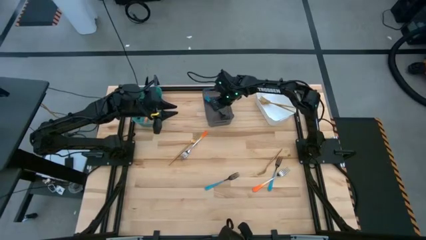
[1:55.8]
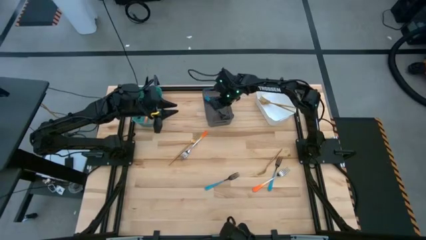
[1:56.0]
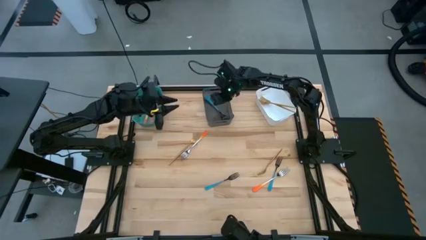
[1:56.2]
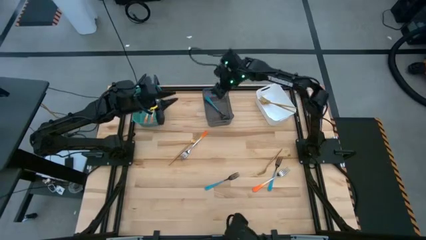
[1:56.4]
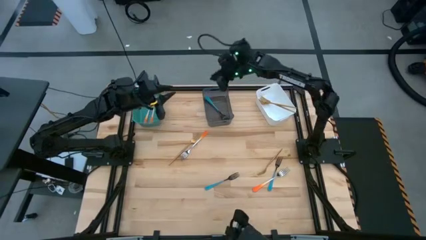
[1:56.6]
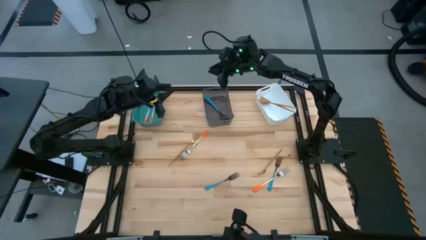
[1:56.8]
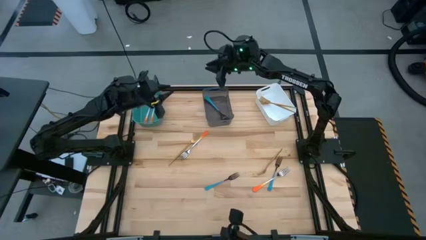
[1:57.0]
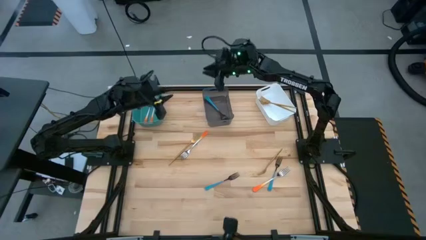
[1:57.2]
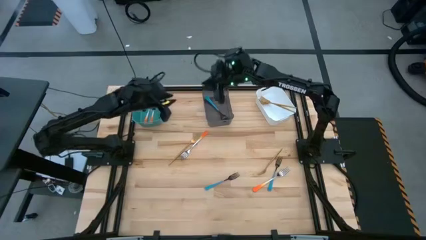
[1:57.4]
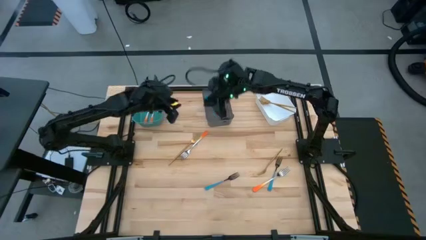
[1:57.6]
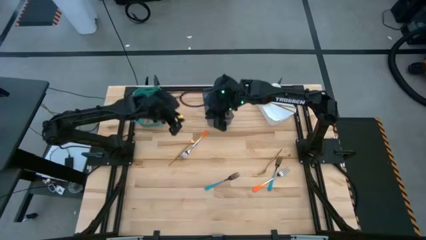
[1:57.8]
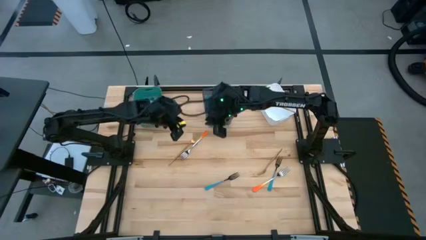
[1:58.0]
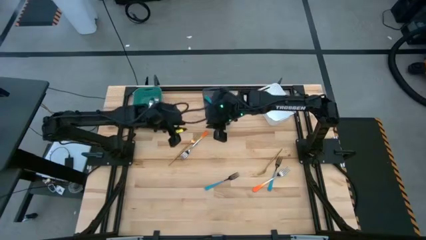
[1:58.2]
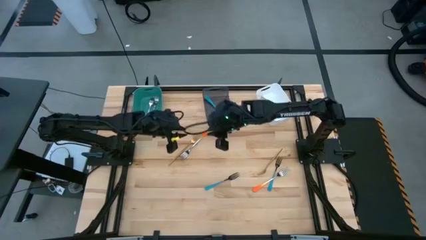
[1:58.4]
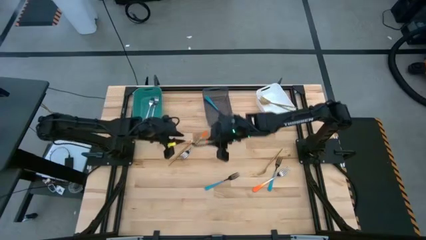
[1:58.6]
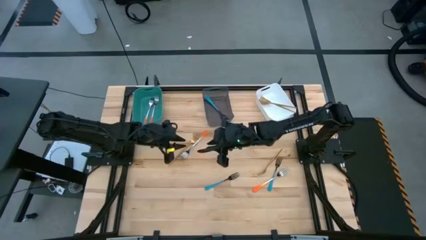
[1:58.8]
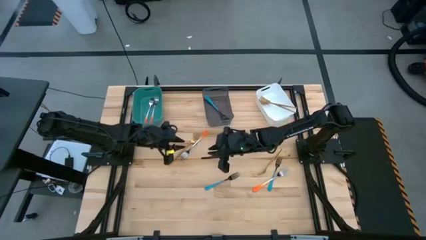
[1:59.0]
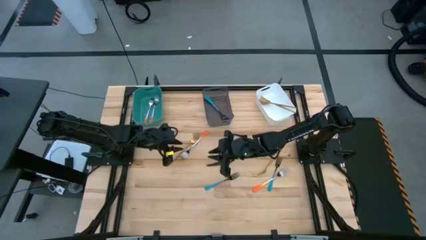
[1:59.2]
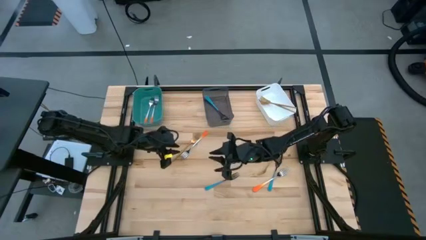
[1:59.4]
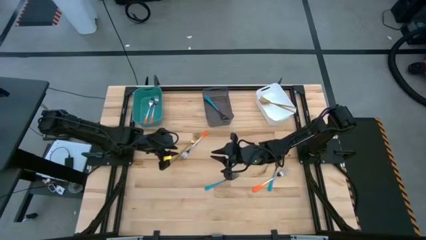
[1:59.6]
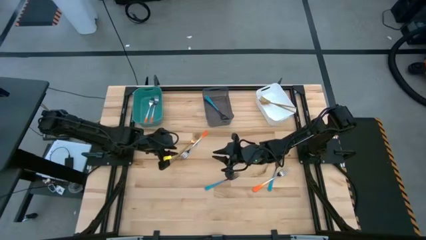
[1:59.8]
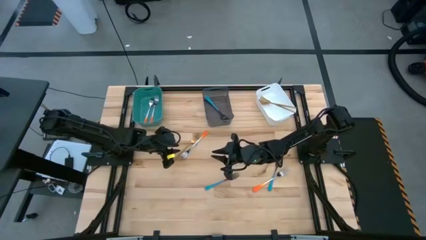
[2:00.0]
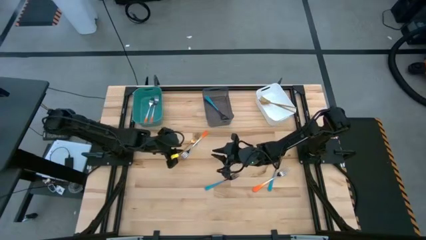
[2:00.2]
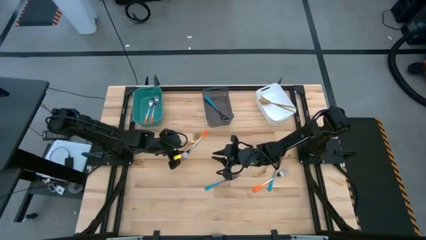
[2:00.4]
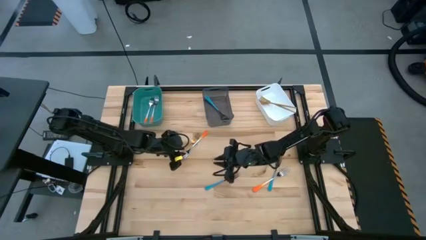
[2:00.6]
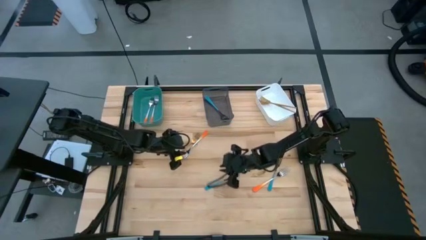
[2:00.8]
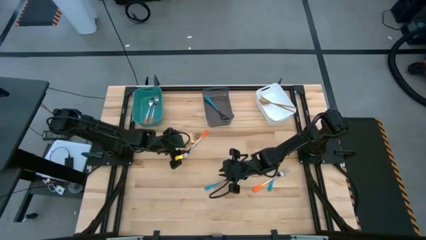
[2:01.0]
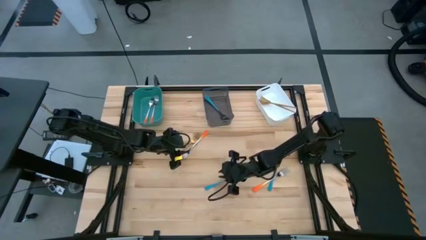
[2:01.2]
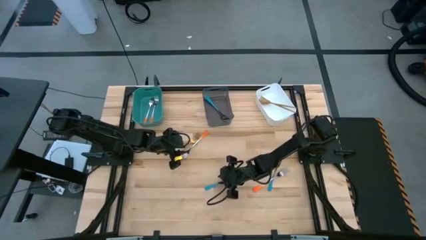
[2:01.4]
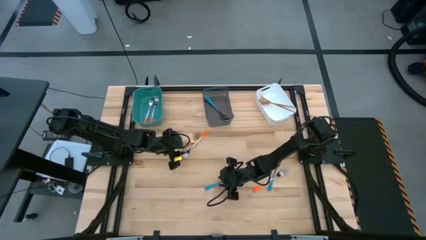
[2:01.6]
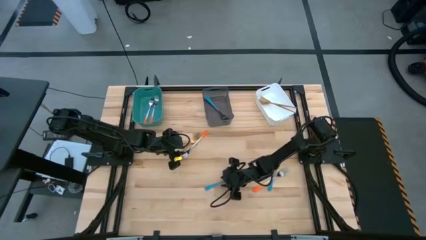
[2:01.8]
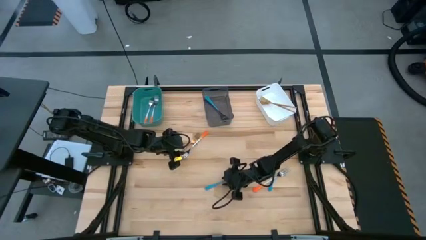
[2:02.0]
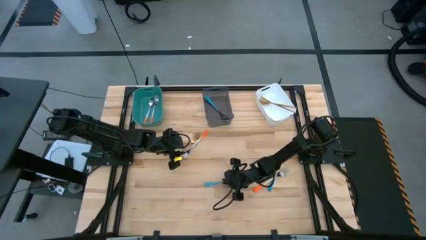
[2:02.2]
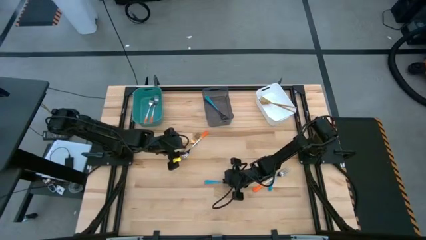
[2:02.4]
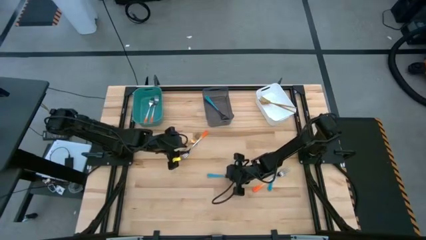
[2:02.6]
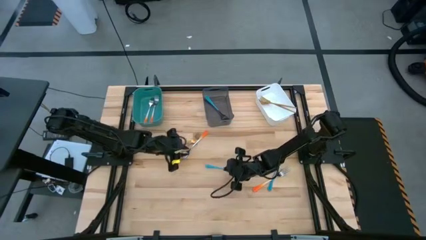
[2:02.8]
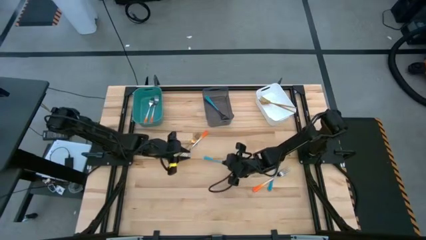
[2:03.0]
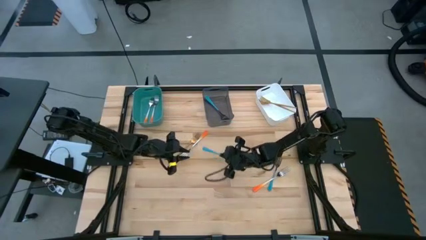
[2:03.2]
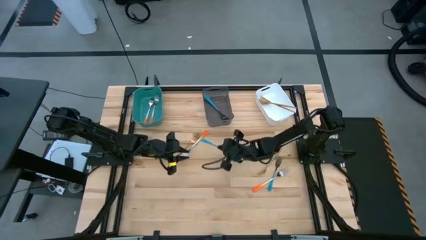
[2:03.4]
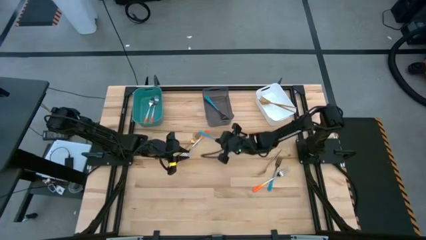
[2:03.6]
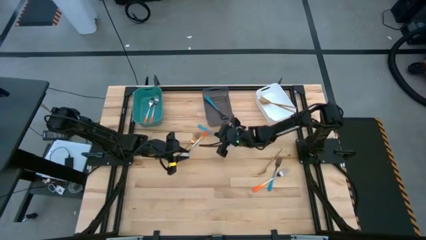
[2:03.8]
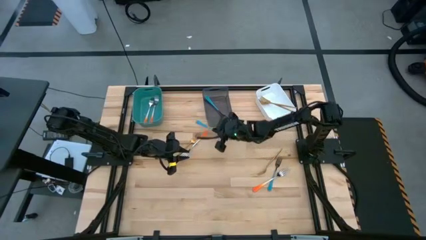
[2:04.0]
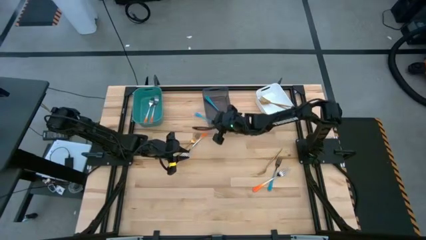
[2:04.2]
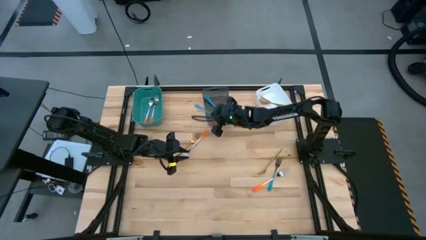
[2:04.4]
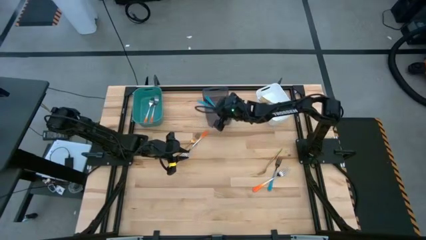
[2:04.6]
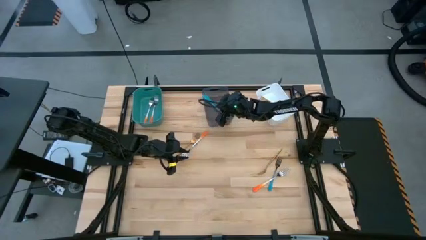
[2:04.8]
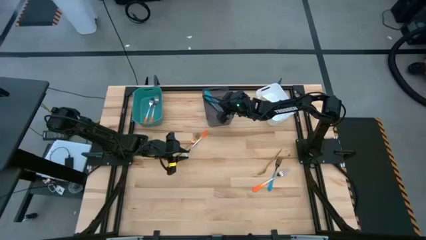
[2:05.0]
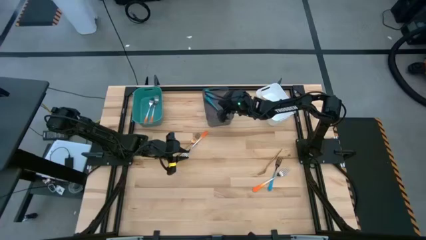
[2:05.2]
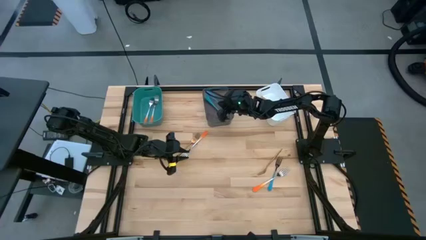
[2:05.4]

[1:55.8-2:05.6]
Task: Sort silverware by color (type)
Put the left blue fork into the black bin

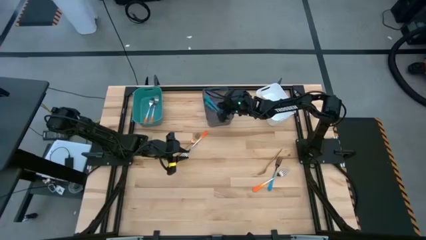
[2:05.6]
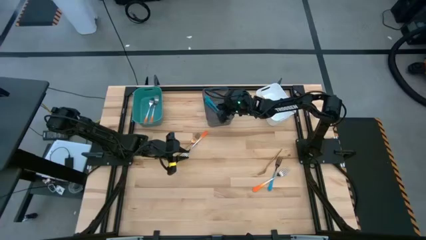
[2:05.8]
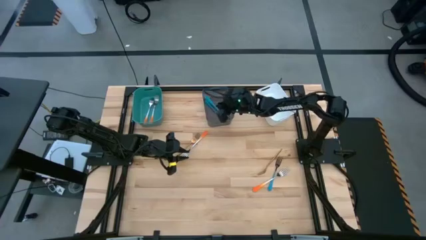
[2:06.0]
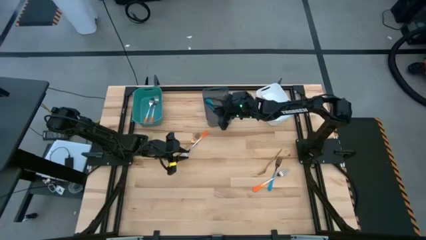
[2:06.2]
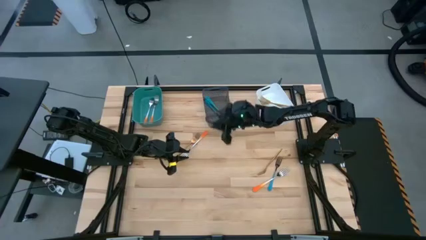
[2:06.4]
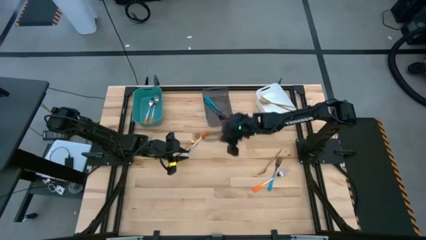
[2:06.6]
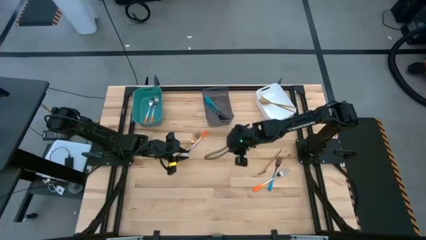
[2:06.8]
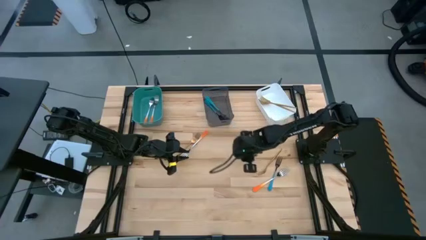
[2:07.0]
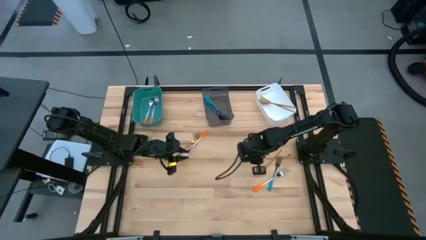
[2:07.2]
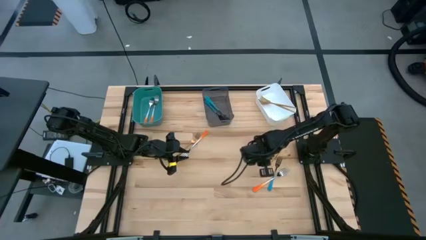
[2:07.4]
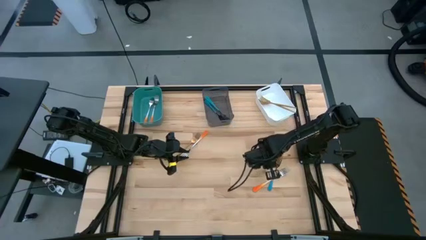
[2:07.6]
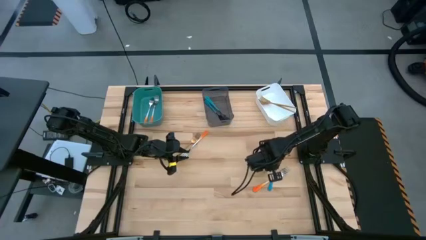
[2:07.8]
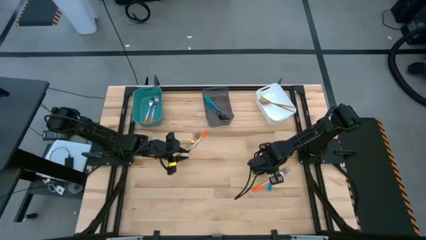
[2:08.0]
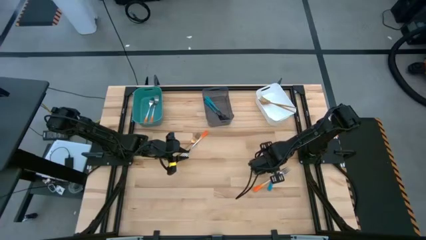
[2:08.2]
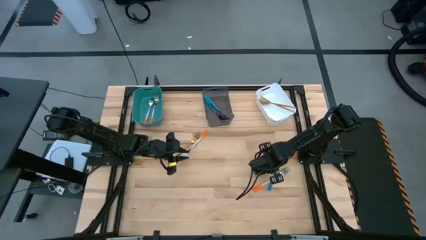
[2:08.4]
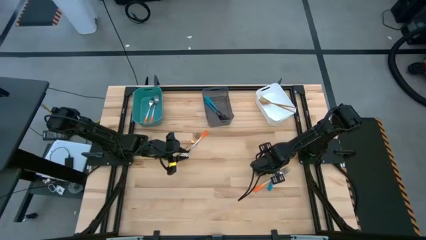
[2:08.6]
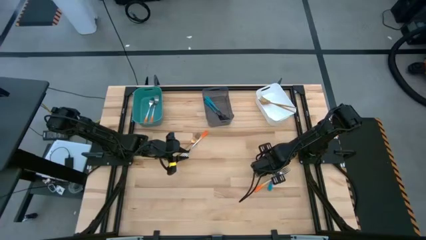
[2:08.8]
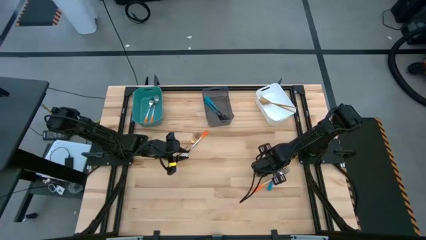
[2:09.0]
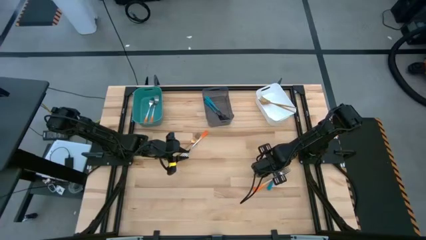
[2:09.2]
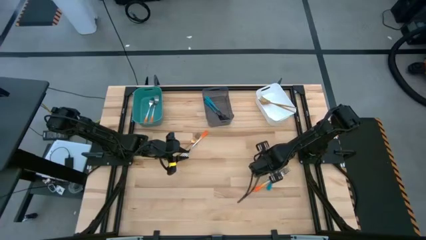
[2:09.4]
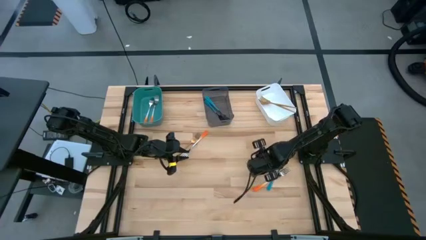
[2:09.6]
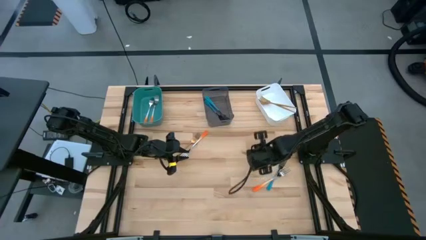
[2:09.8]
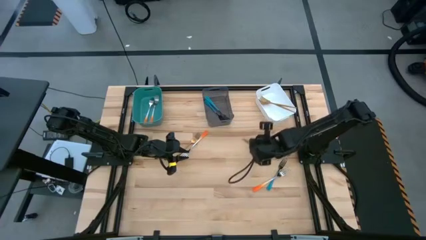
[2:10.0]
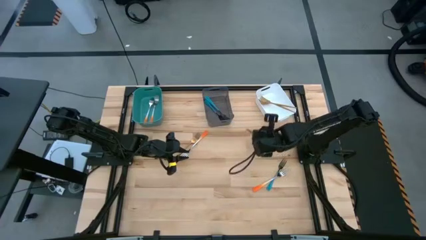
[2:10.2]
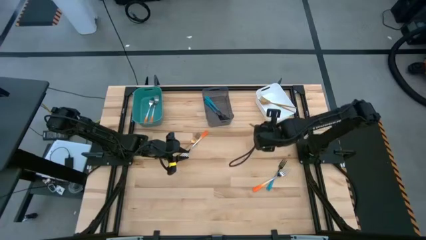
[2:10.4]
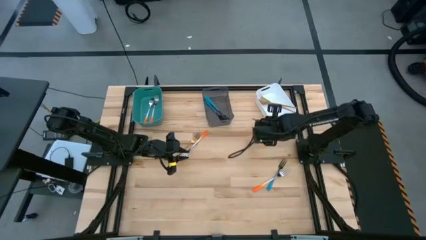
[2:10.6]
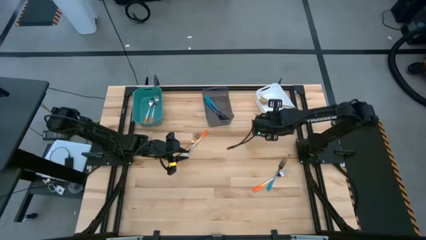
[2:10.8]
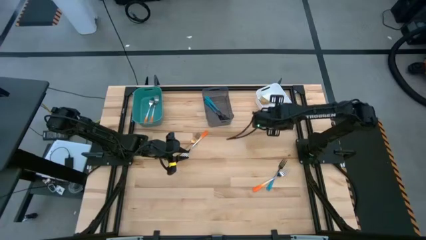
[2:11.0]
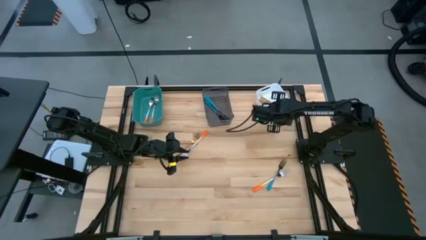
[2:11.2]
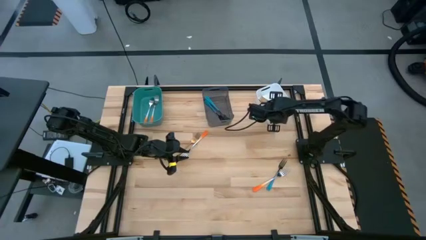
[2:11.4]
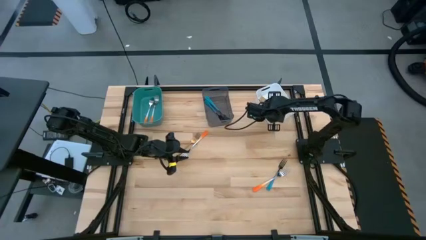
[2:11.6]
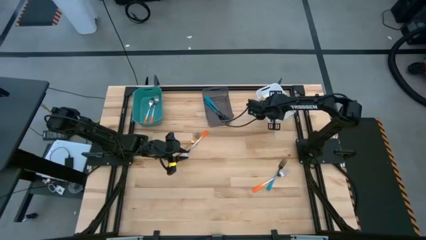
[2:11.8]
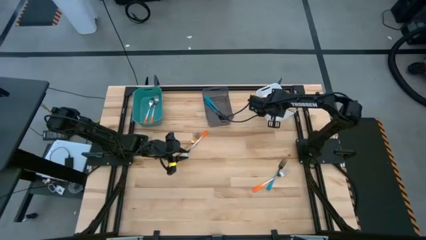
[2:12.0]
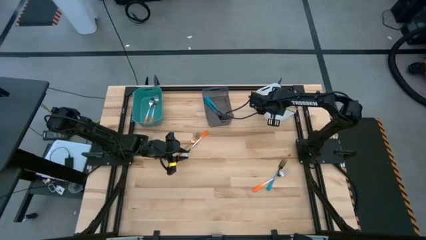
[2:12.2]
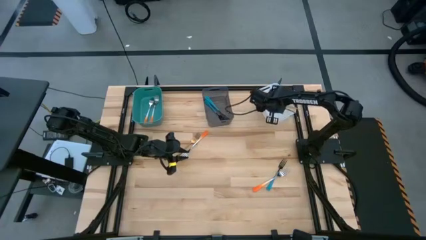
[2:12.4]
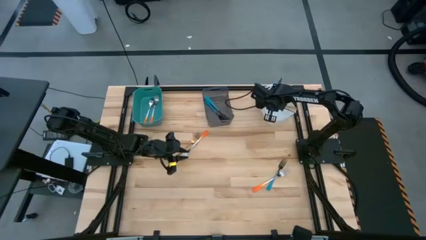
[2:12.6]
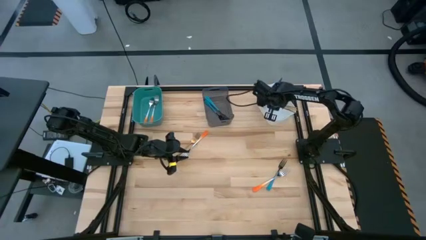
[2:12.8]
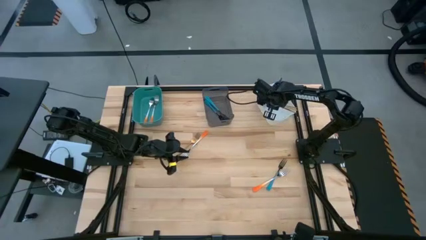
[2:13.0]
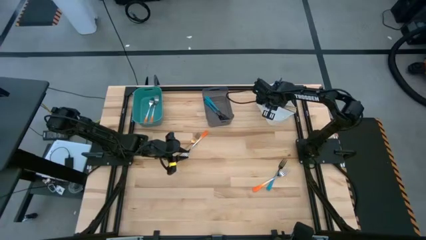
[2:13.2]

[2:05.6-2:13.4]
Put the right gold fork into the white bin
